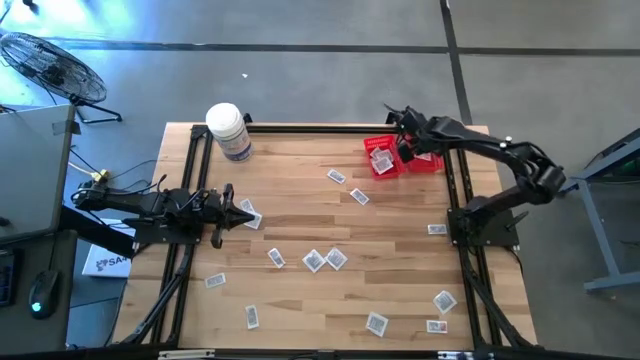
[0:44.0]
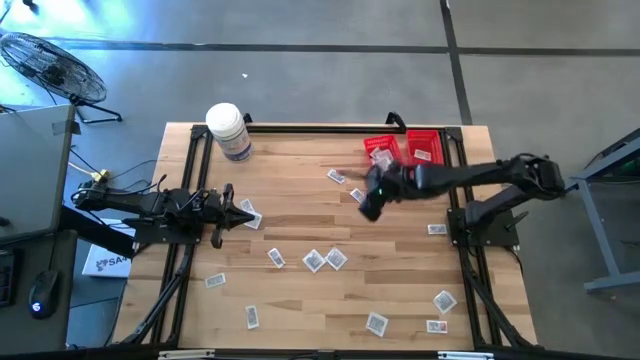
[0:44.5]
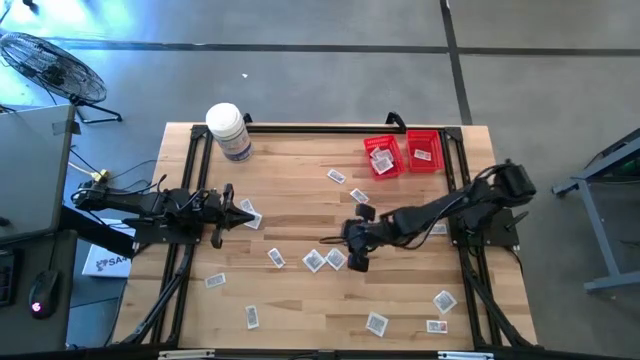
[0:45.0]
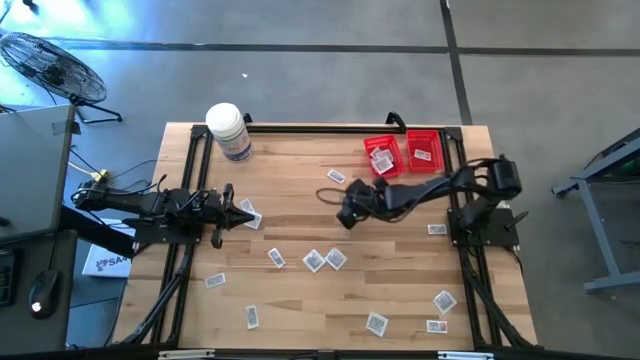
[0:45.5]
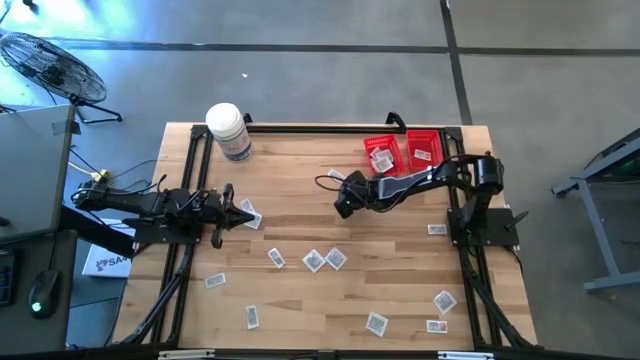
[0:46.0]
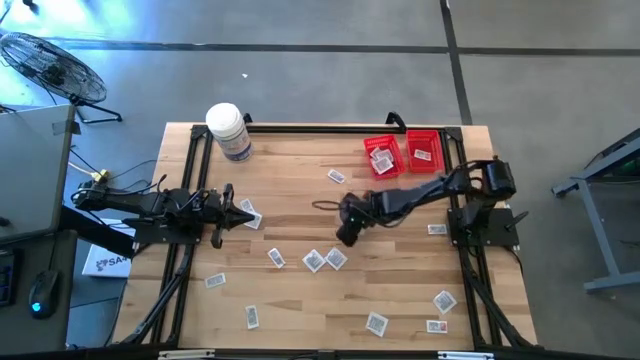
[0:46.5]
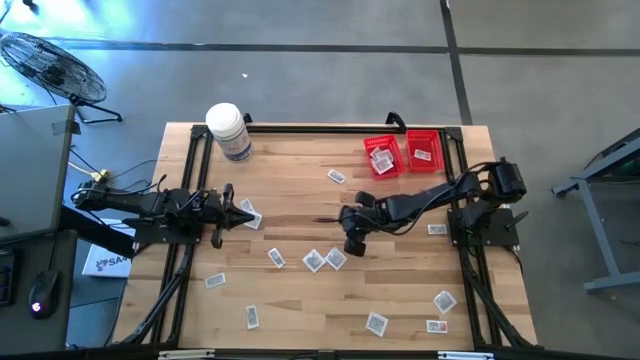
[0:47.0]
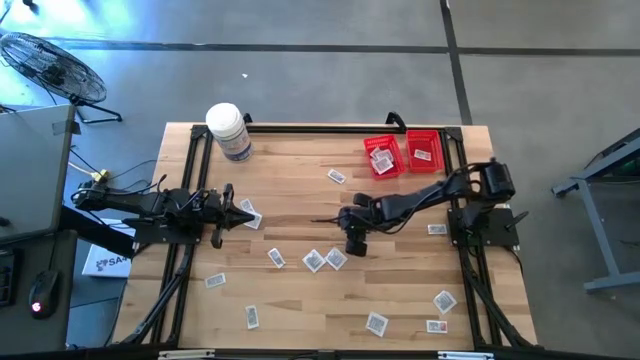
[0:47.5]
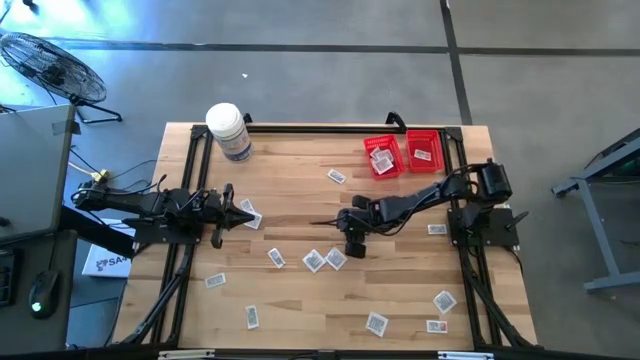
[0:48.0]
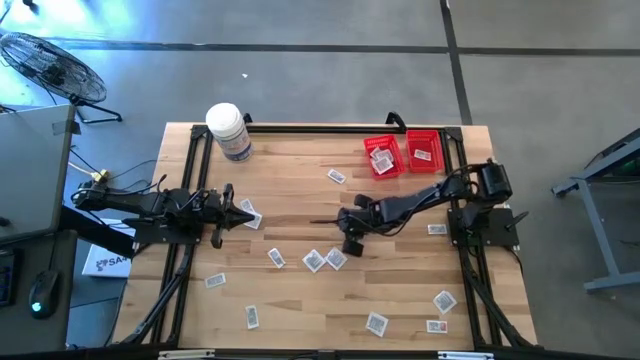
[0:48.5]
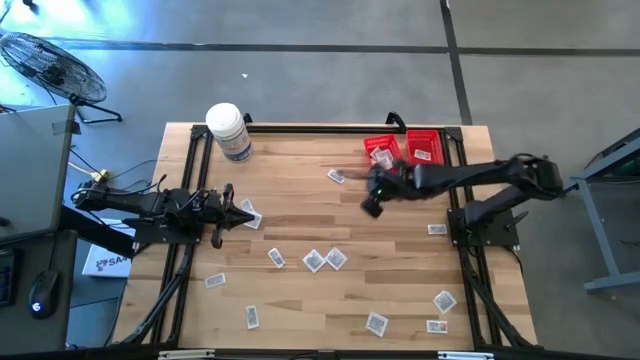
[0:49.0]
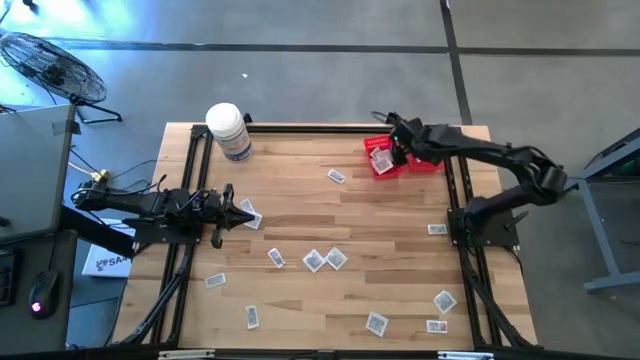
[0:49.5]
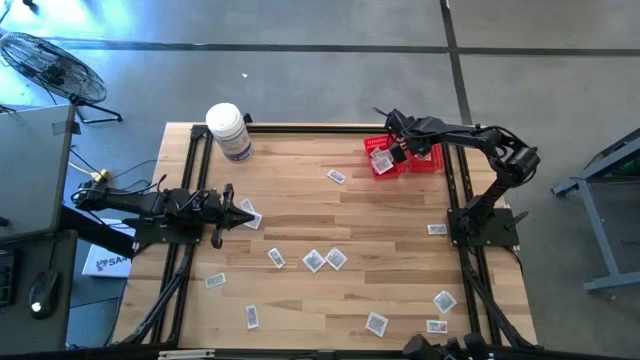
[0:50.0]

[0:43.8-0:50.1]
Task: Pick & Place First Aid Supplies
Put the ointment pack into the right red bin

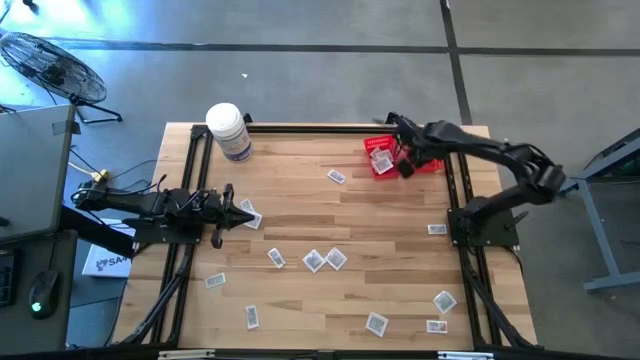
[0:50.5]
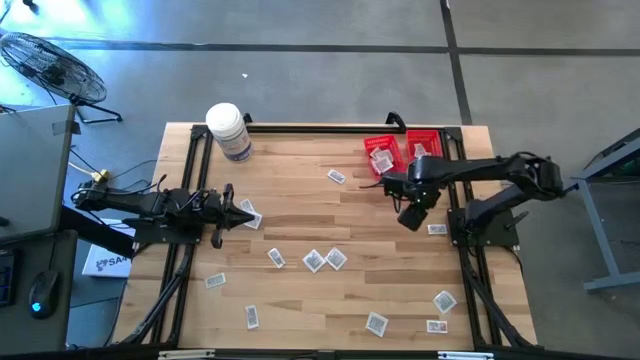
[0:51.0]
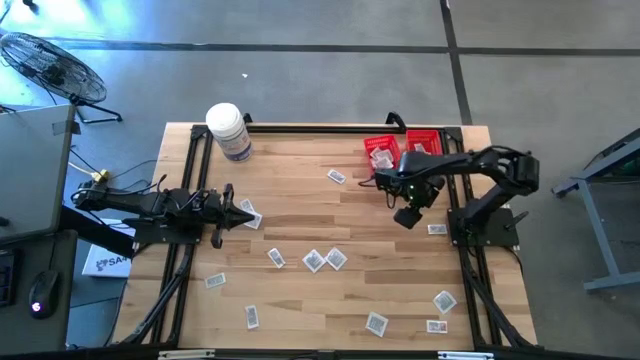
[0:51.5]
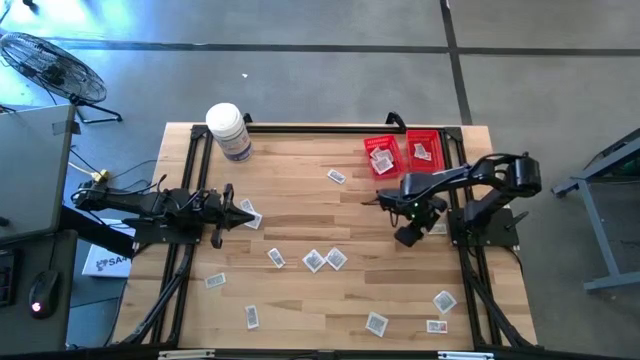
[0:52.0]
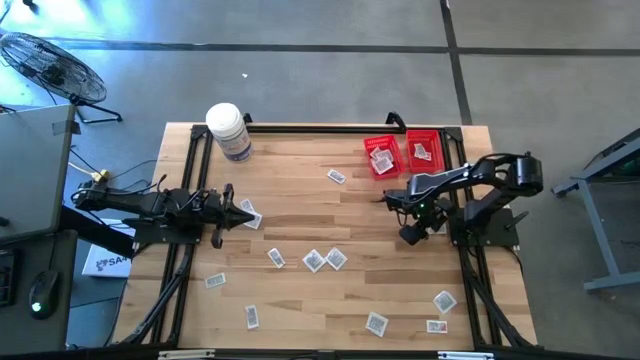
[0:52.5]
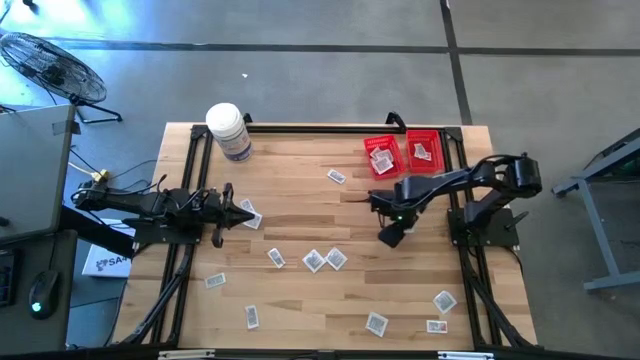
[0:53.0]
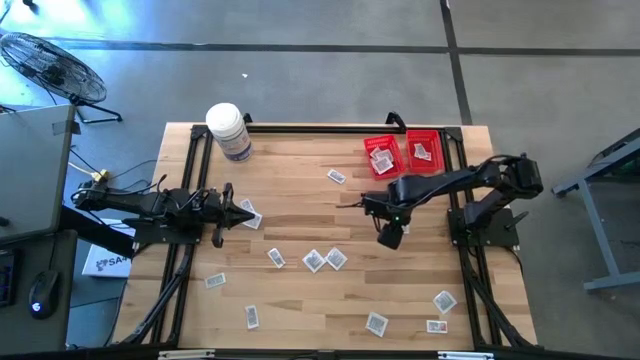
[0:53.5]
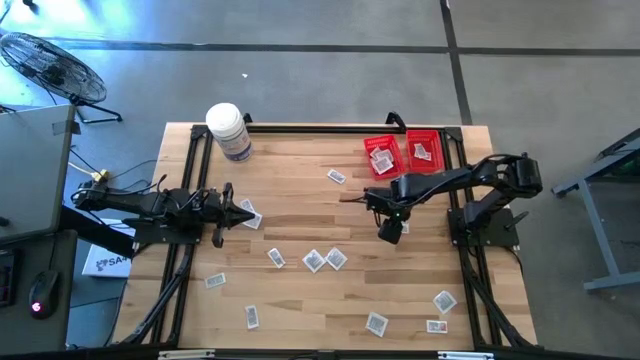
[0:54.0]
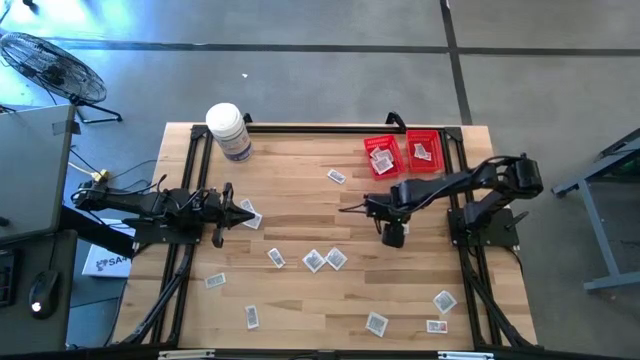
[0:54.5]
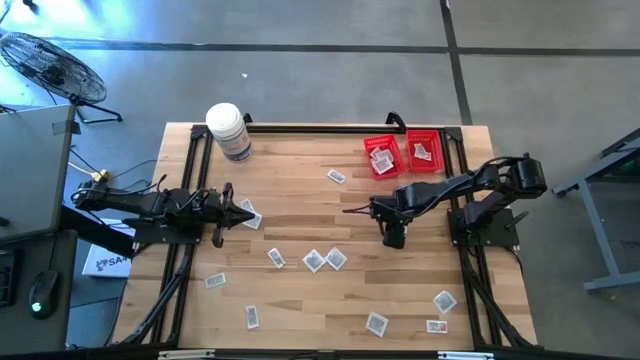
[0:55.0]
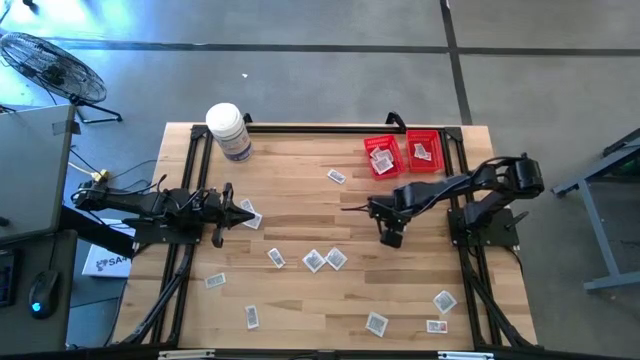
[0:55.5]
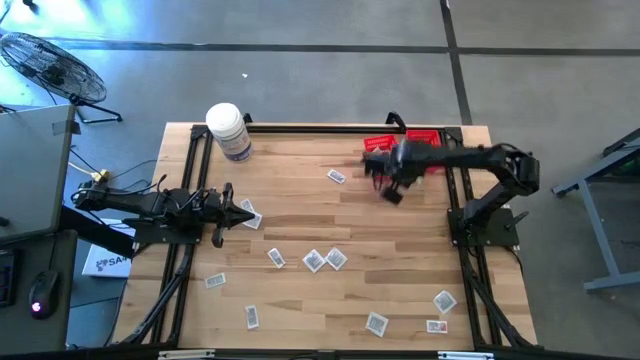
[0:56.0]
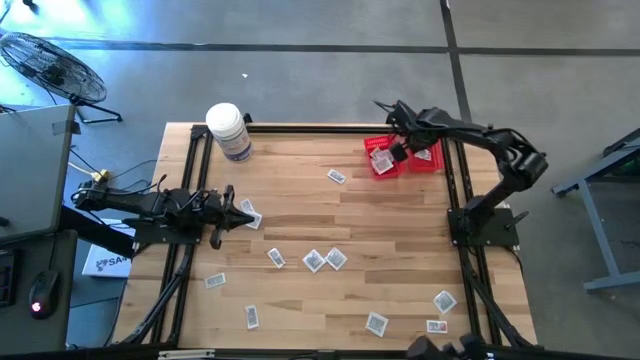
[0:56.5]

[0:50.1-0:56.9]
Put the ointment pack into the right red bin

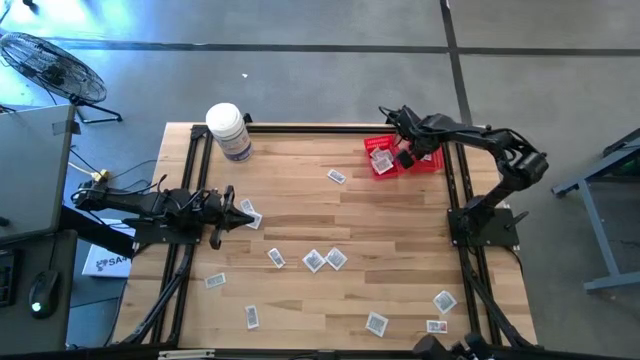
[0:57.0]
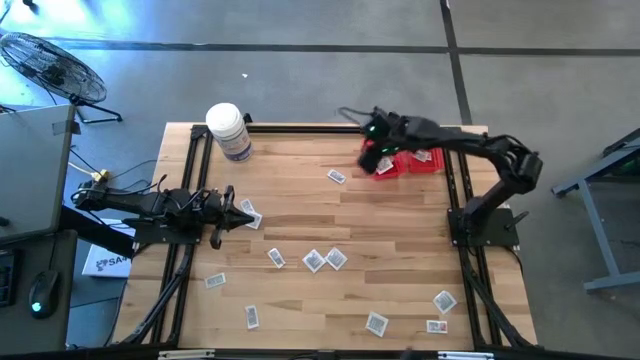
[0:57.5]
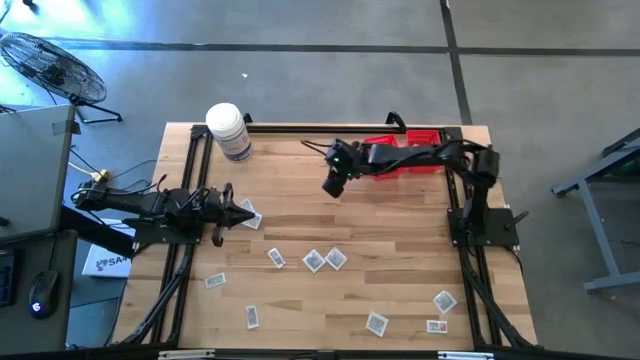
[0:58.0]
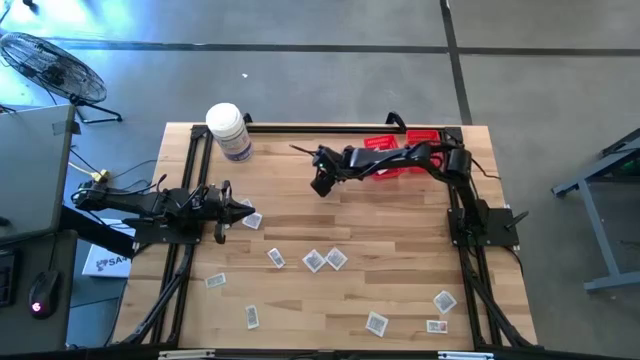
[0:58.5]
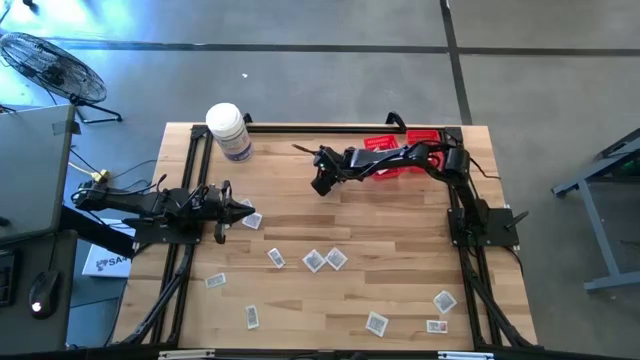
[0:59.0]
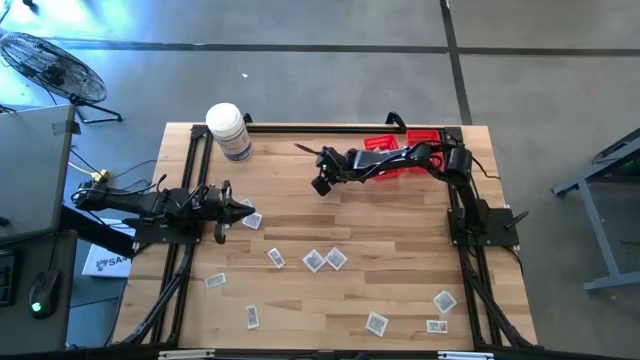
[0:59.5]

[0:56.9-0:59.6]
Put the ointment pack into the right red bin

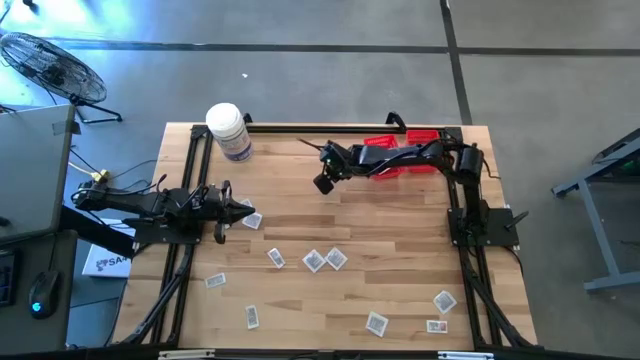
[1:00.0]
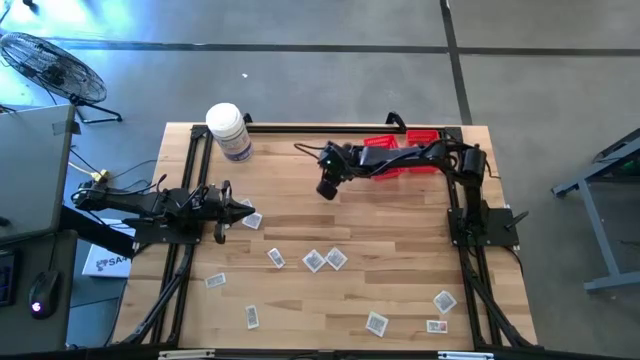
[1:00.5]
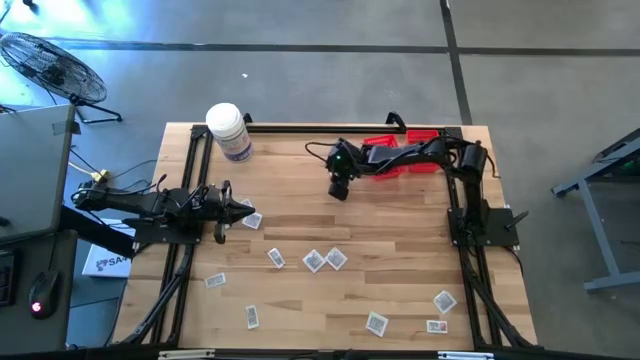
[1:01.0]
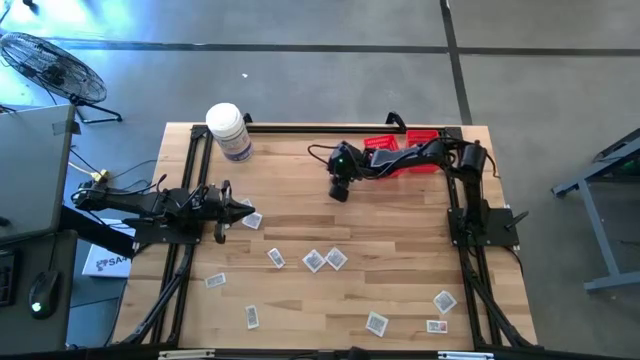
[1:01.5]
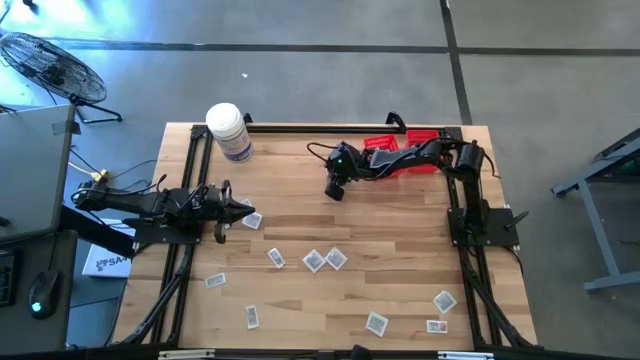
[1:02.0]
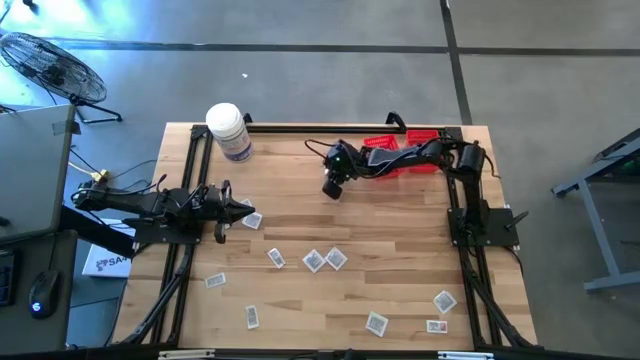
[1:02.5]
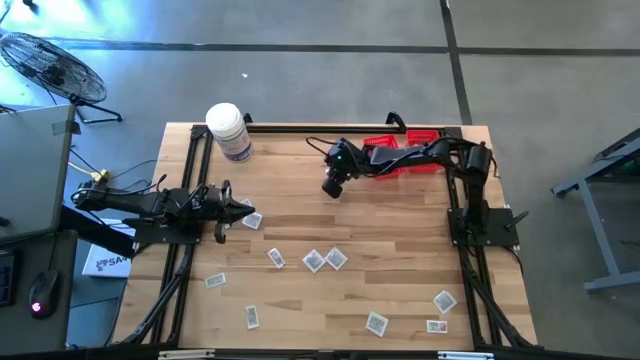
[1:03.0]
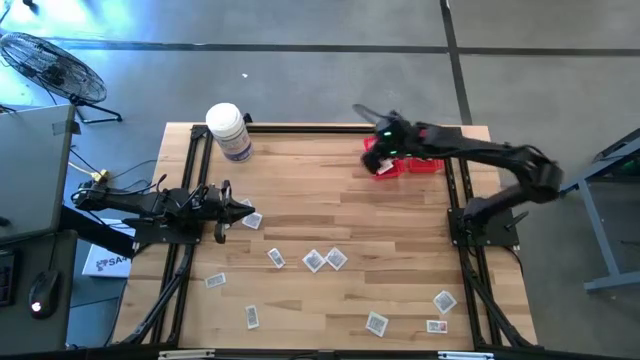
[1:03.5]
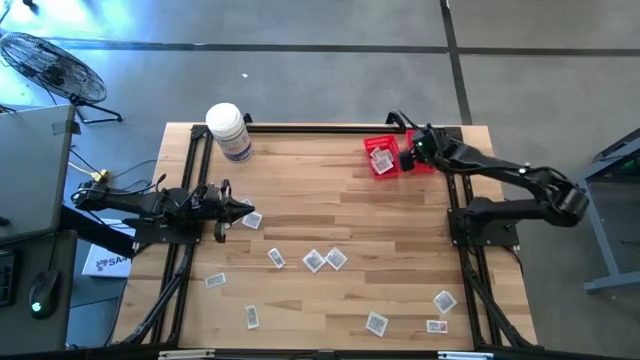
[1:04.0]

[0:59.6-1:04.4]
Put the ointment pack into the right red bin

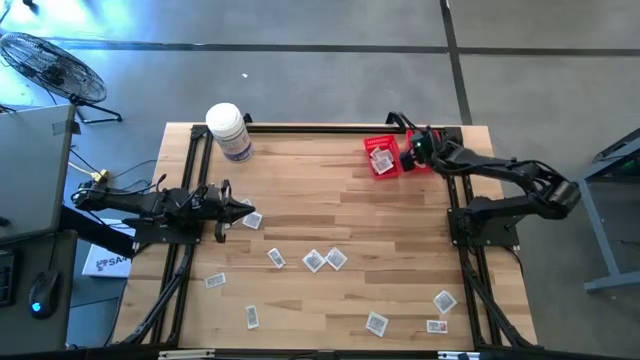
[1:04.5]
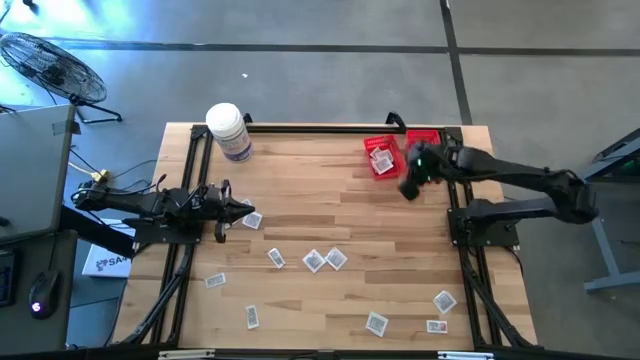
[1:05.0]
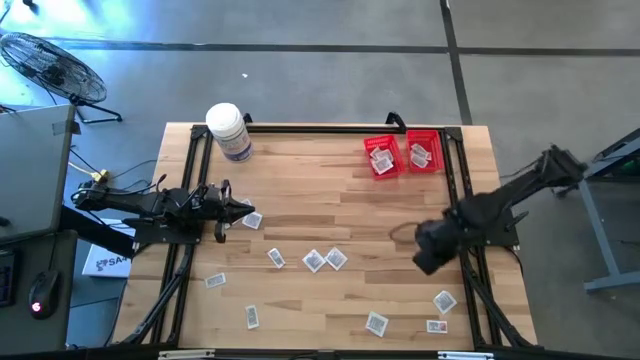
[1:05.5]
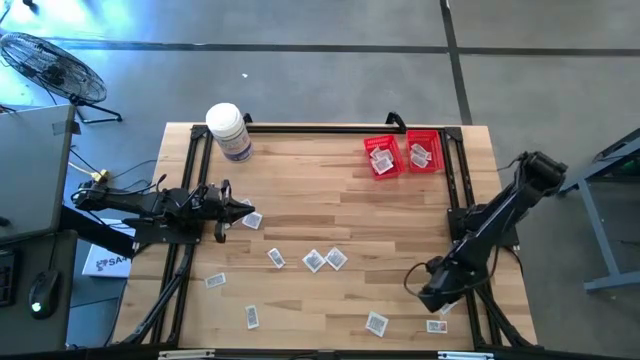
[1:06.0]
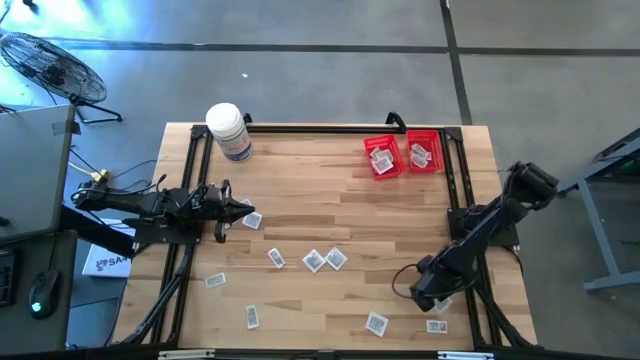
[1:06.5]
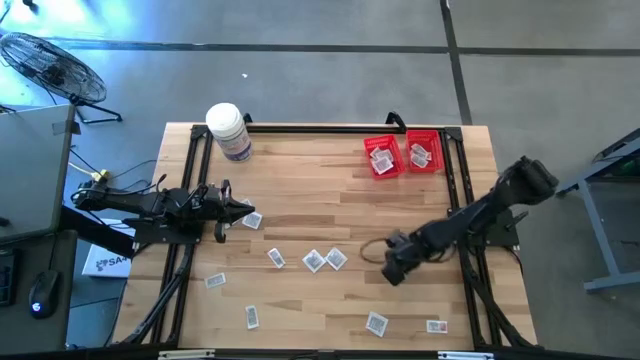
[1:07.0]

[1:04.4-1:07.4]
Move the towelette pack into the left red bin
